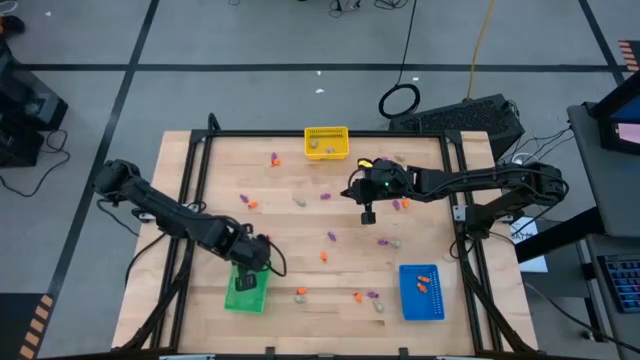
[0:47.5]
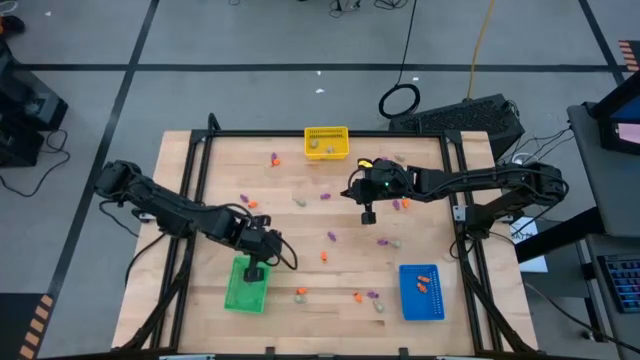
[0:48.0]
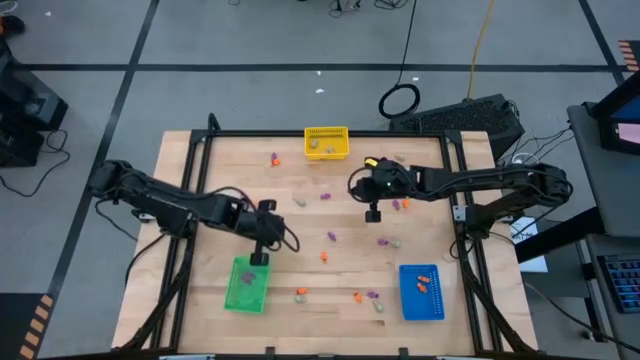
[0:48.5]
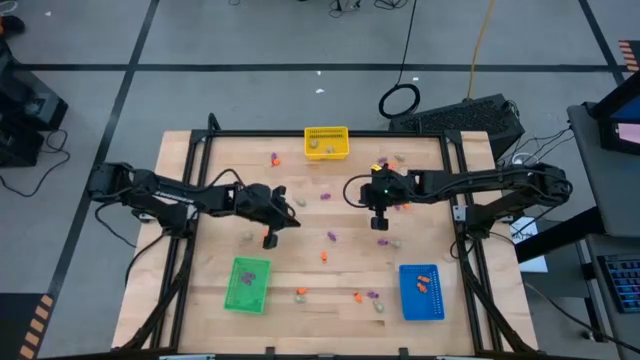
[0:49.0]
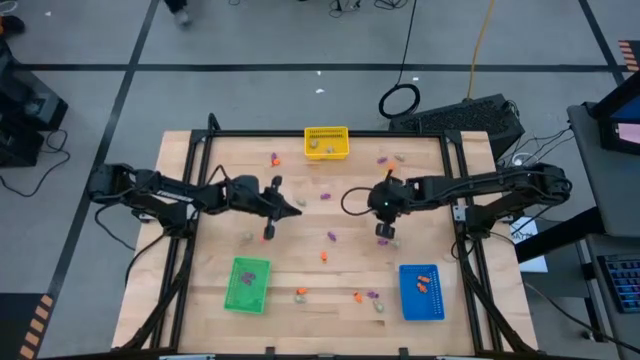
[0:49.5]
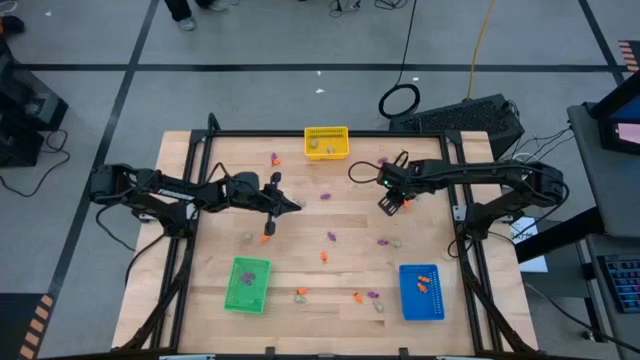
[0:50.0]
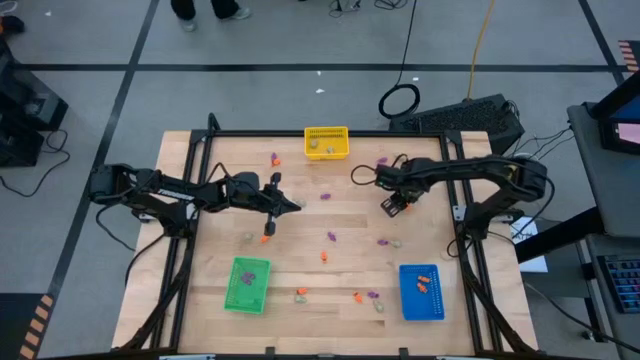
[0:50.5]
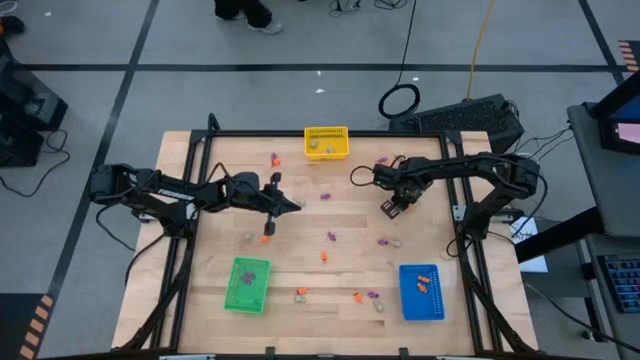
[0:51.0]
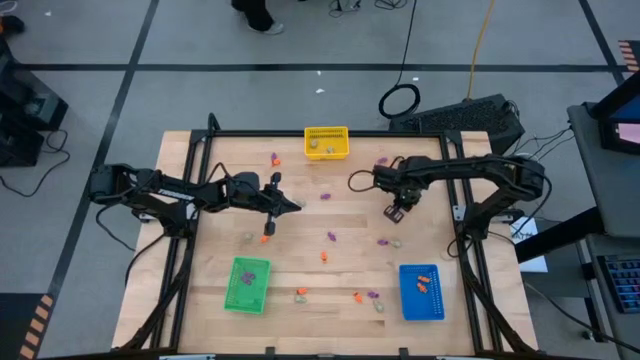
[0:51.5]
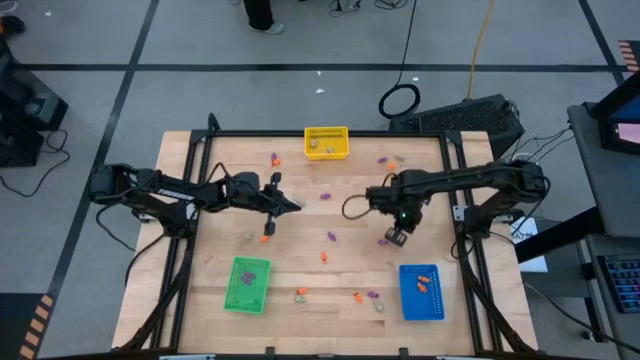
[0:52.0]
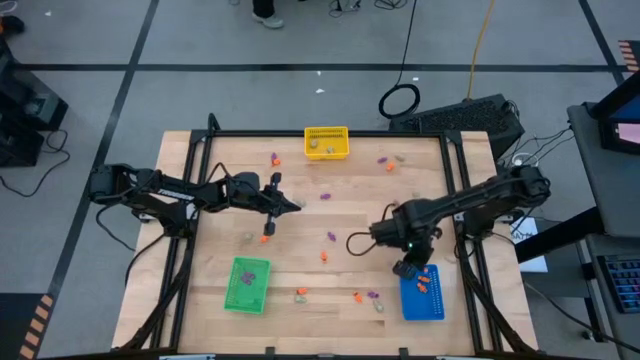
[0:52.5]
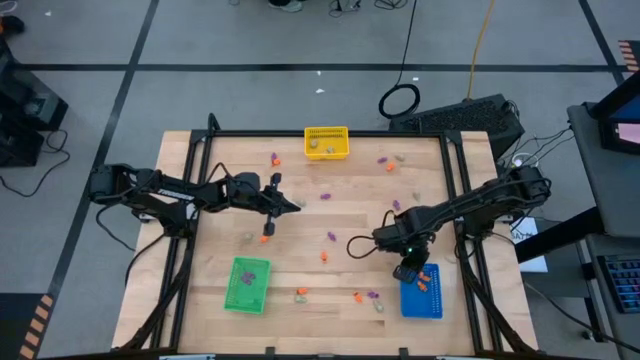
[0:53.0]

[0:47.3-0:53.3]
Task: Sort Halloween decoration
Put the orange skeleton toy into the blue basket

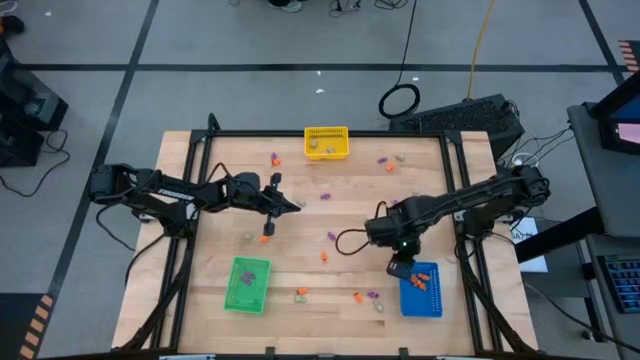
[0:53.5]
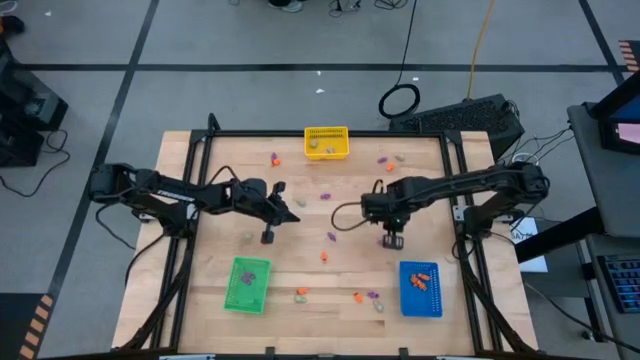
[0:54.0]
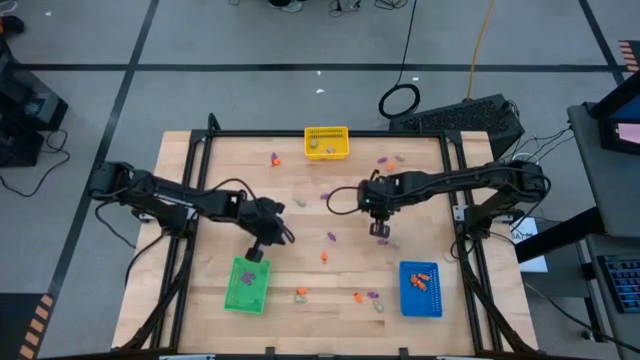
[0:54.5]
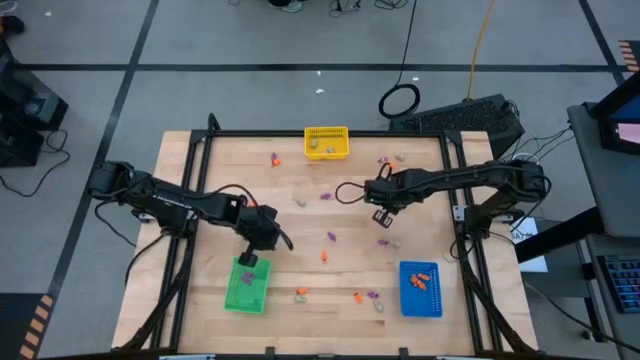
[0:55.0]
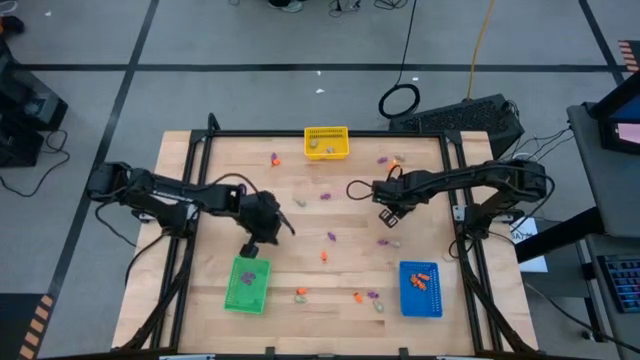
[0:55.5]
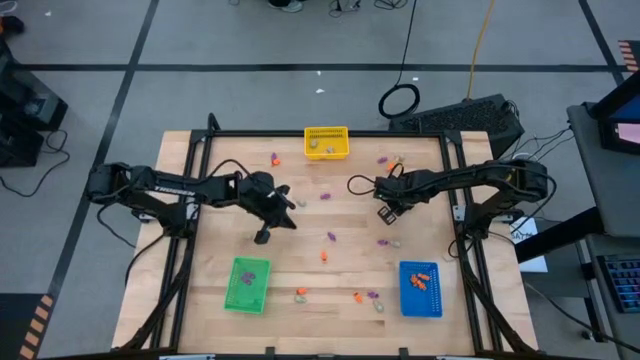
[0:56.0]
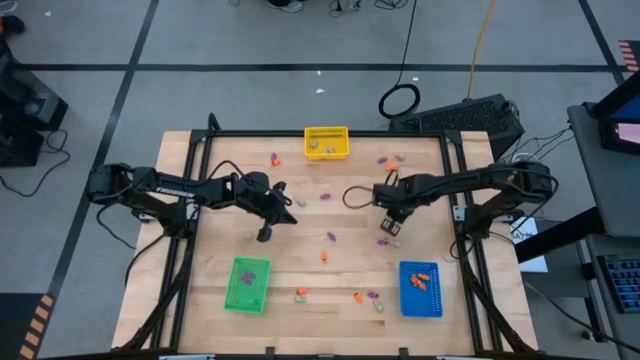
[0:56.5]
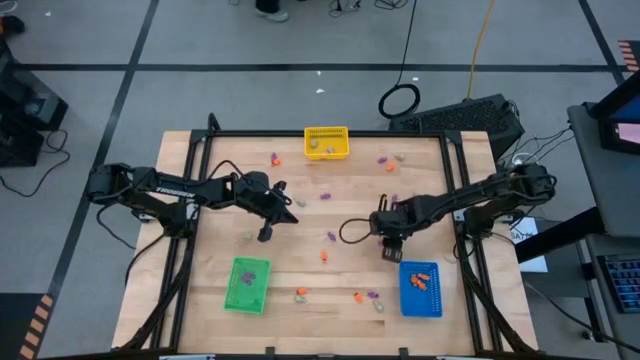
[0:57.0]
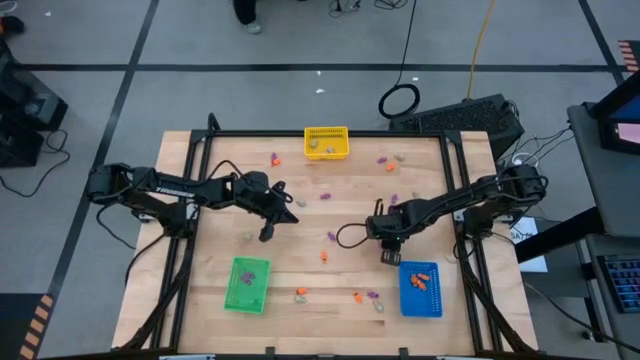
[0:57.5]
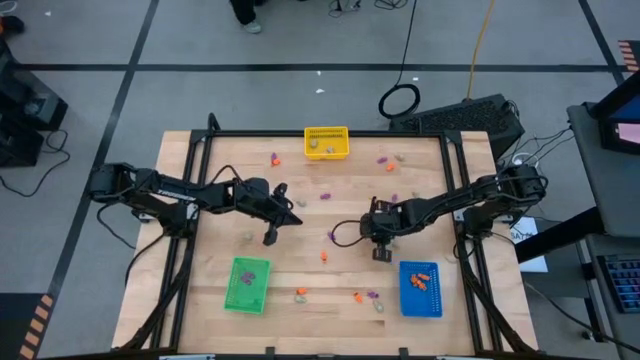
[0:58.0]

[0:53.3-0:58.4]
Put the purple skeleton toy into the green bin

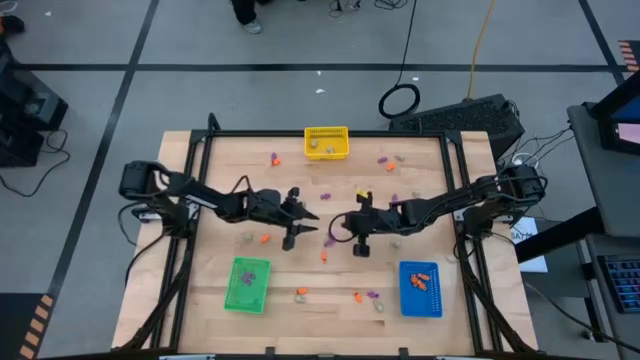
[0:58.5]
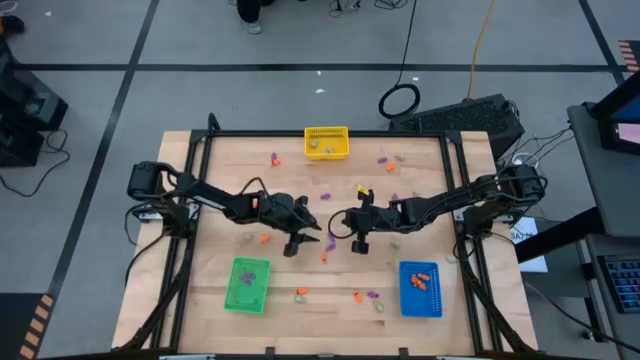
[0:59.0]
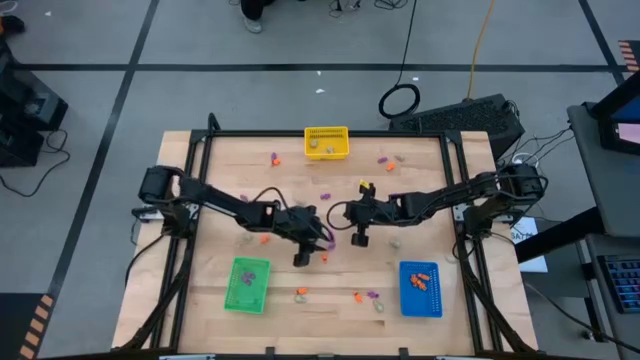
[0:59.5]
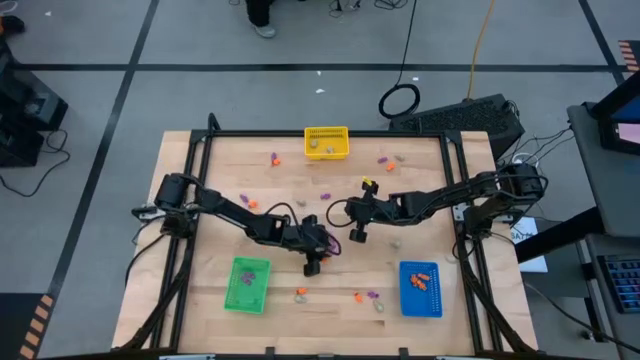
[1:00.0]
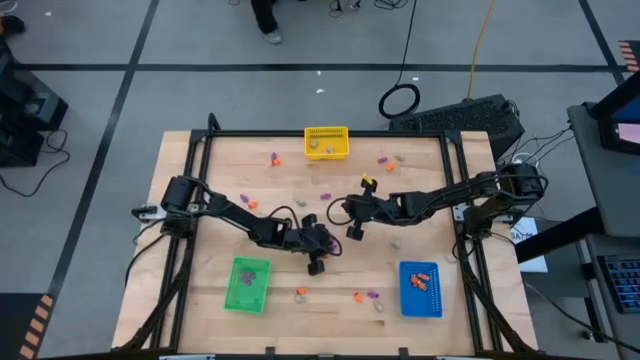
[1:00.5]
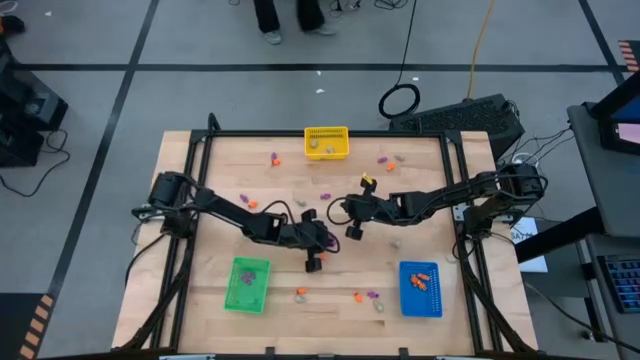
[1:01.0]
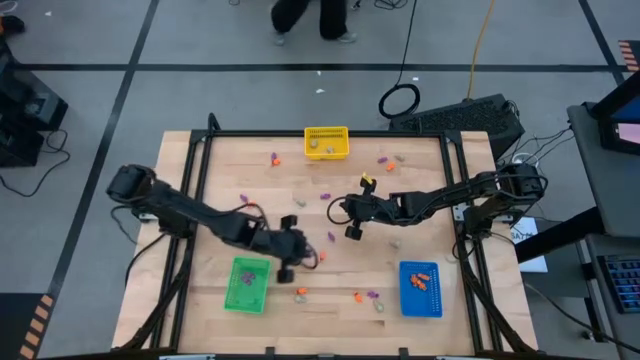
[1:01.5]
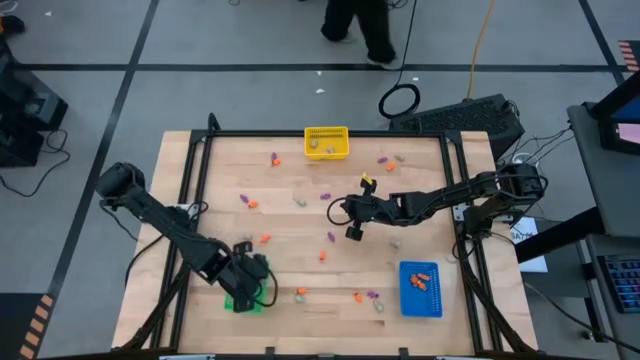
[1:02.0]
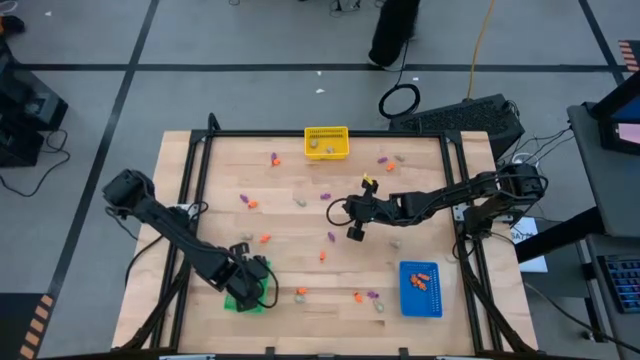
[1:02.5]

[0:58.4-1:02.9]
Put the purple skeleton toy into the green bin

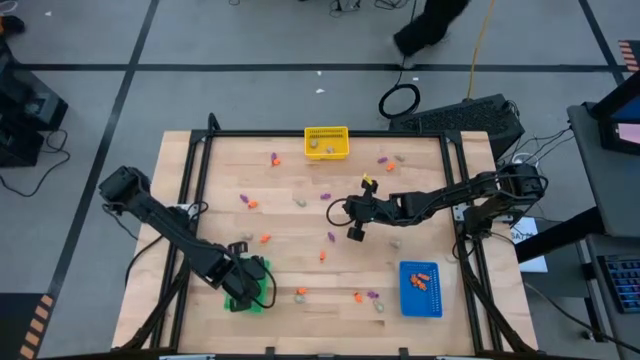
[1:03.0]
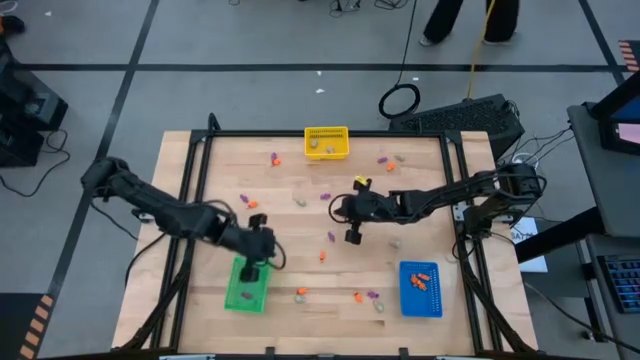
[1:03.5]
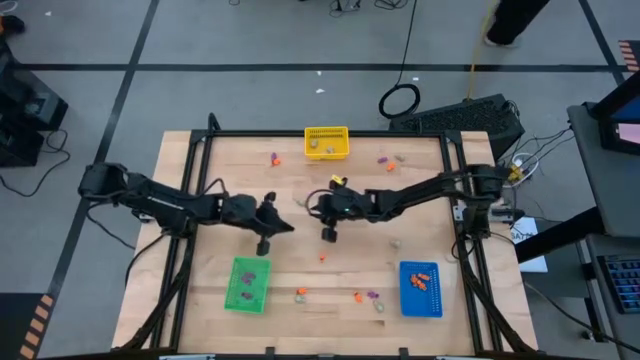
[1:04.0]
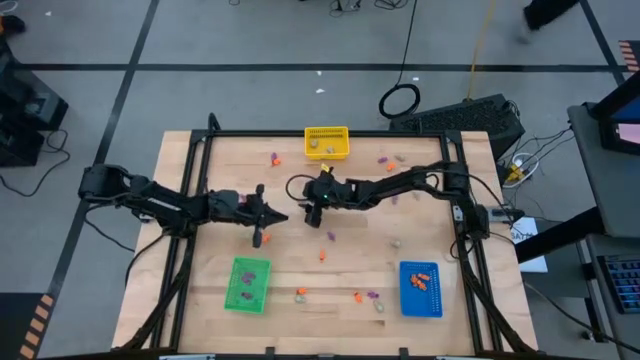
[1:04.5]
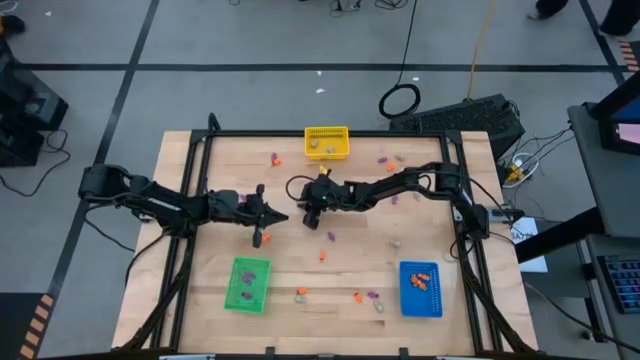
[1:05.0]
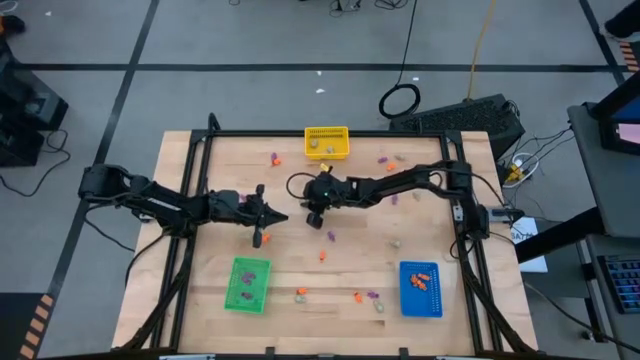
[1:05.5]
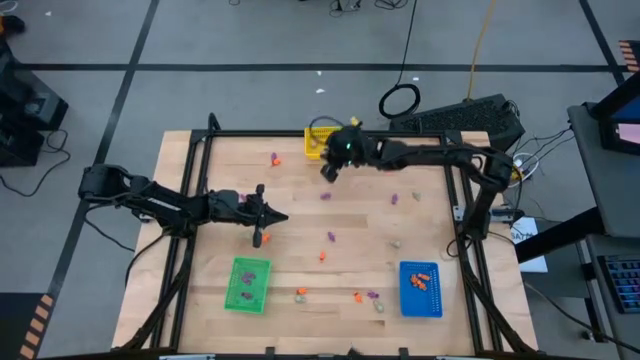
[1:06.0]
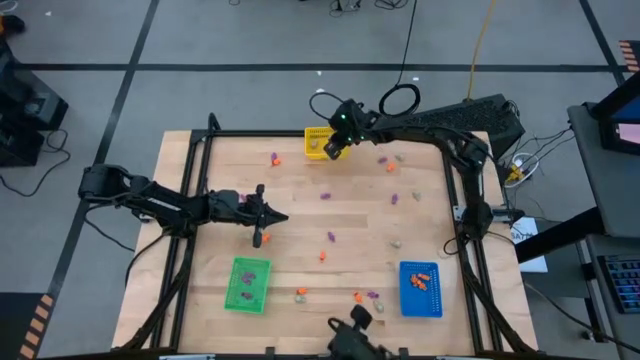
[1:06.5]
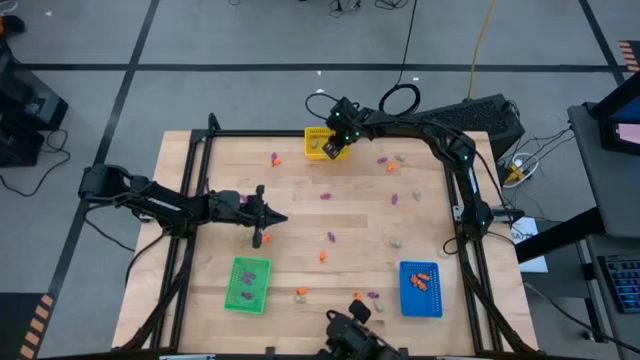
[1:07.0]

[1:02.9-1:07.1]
Put the gray skull toy into the yellow bin

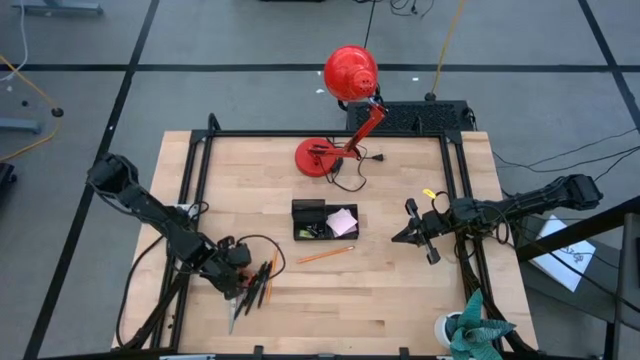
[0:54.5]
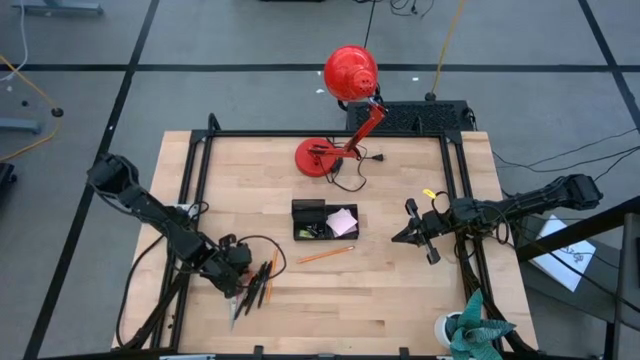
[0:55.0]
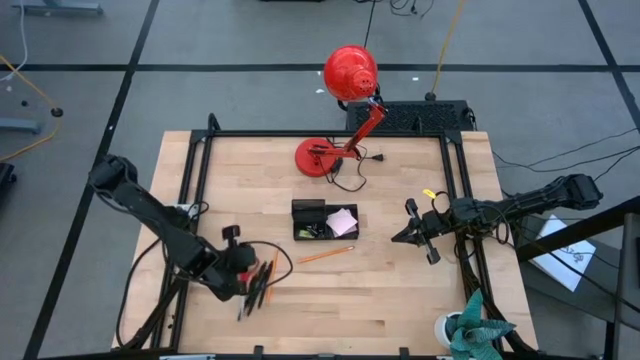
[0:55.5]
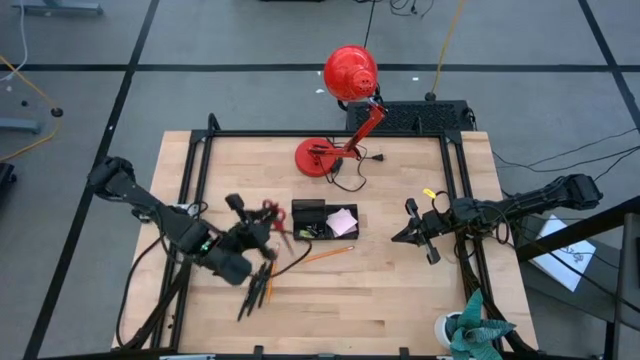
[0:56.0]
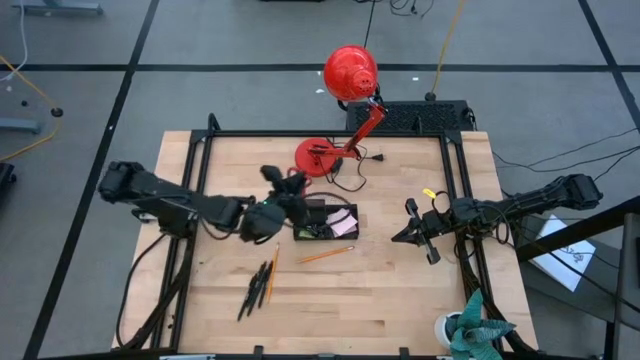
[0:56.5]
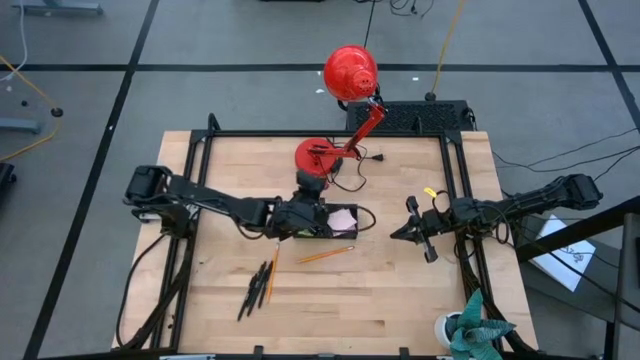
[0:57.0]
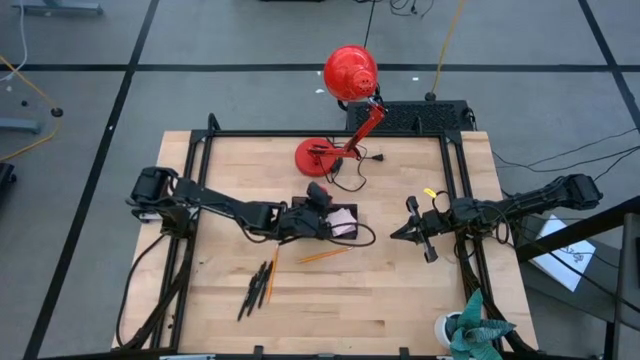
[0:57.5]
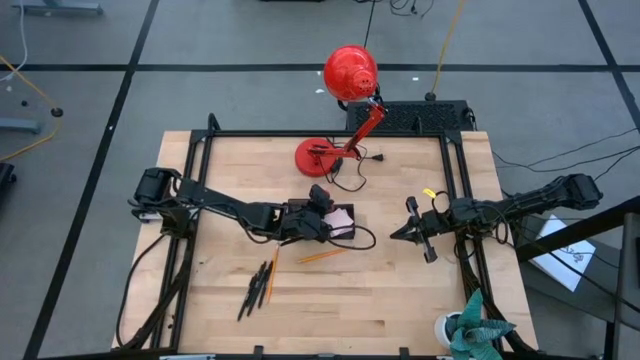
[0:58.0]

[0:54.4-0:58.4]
Task: Pick and place office supplies into organizer
Put the scissors into the desk organizer
